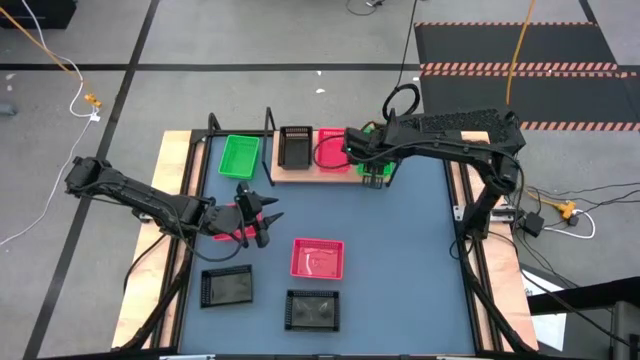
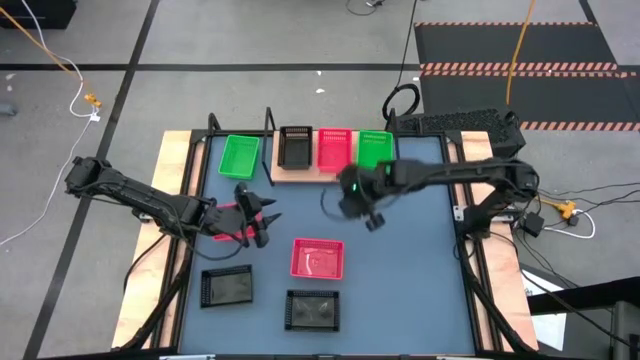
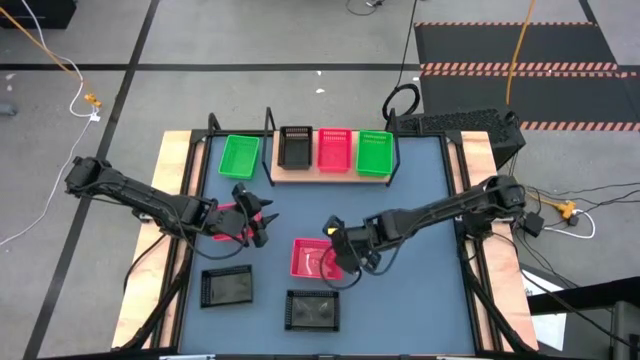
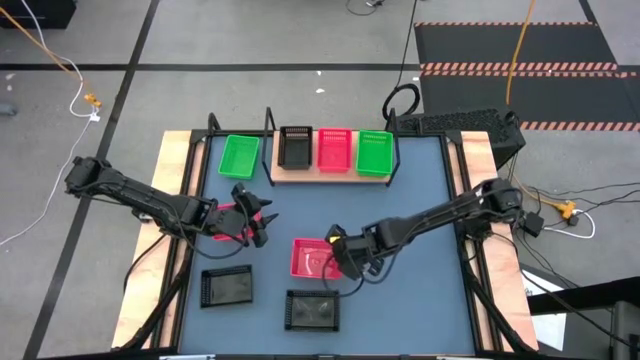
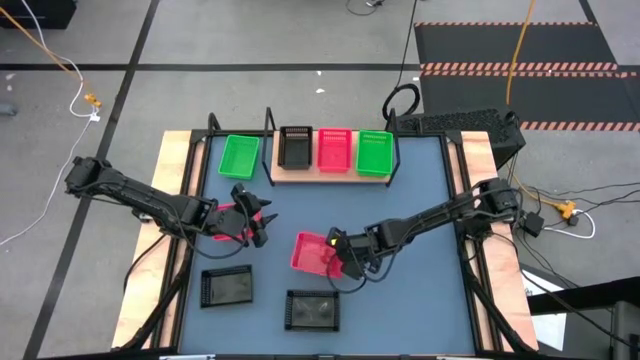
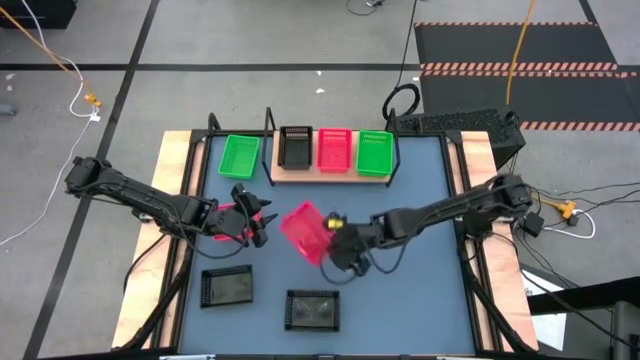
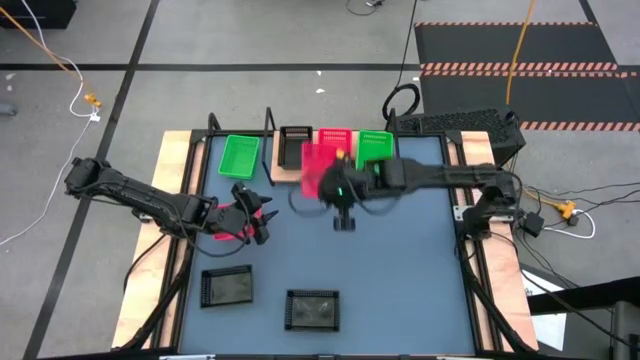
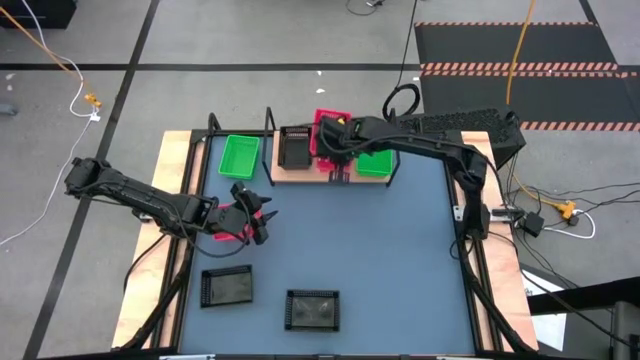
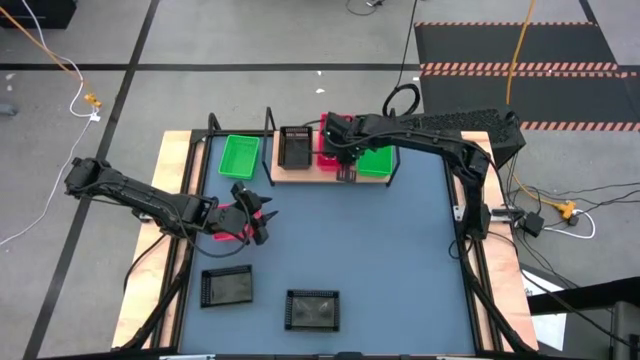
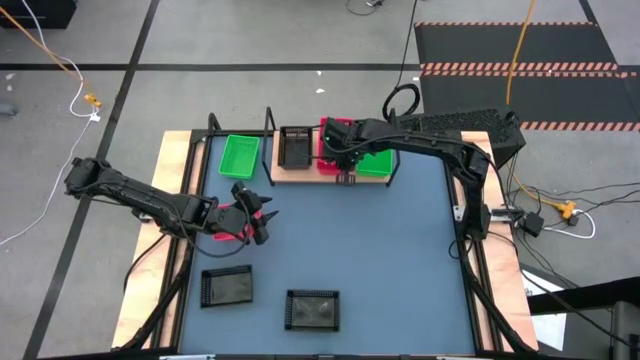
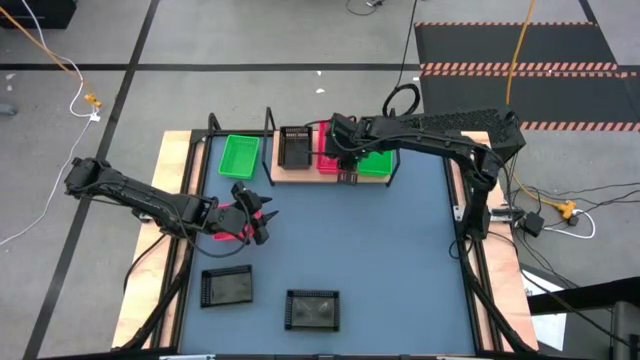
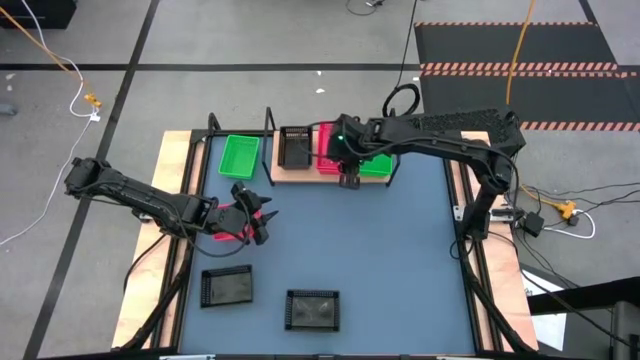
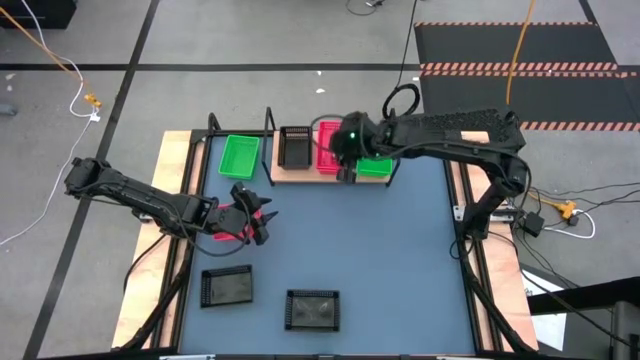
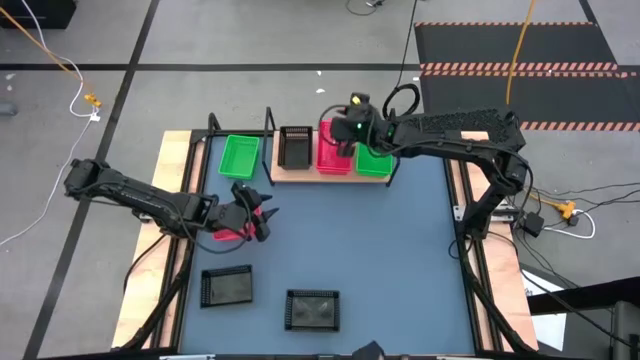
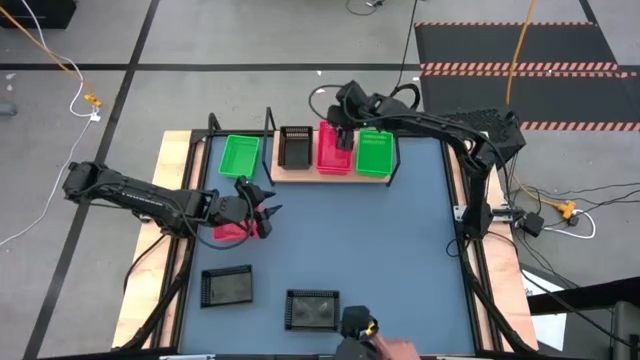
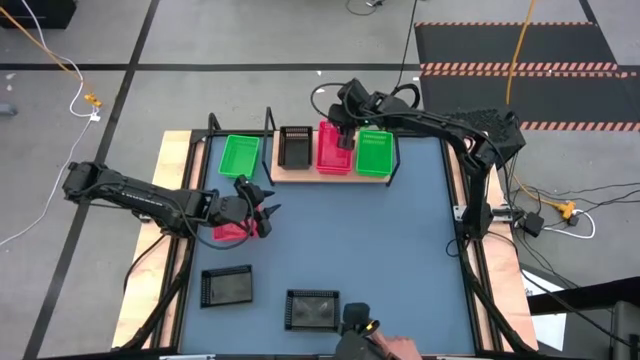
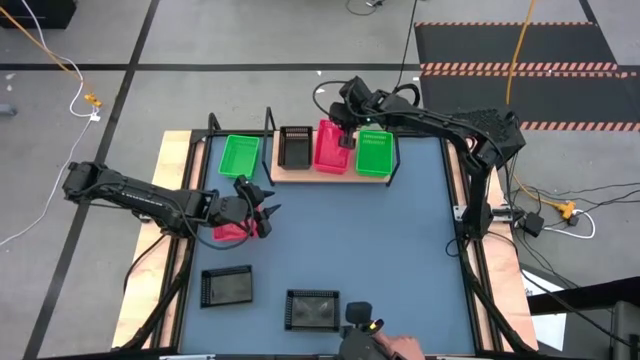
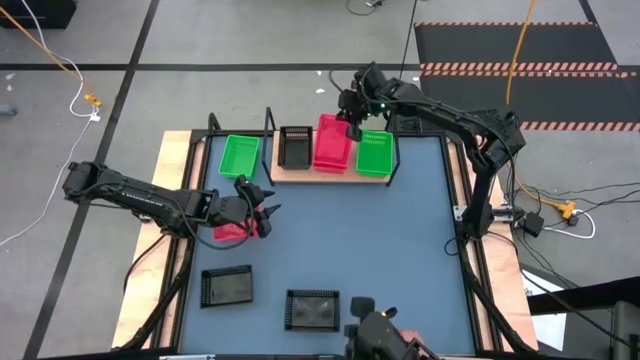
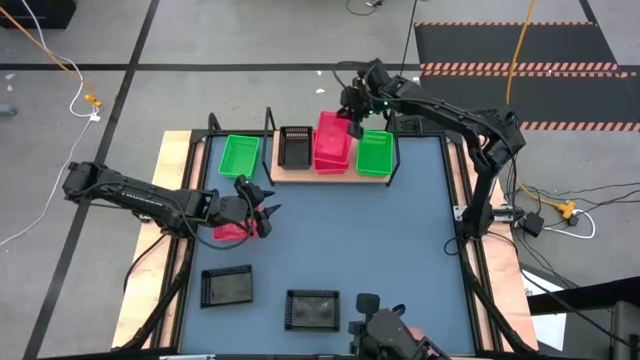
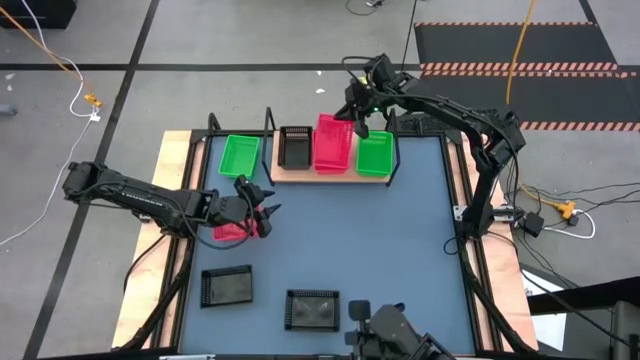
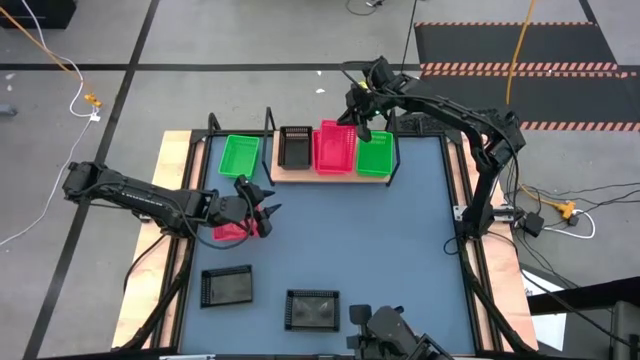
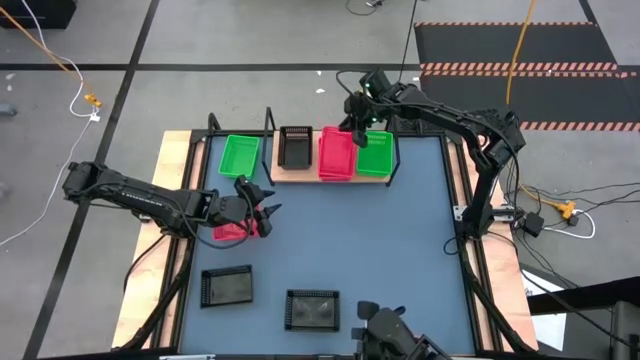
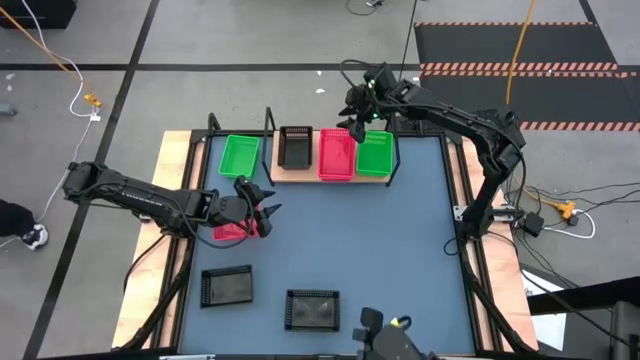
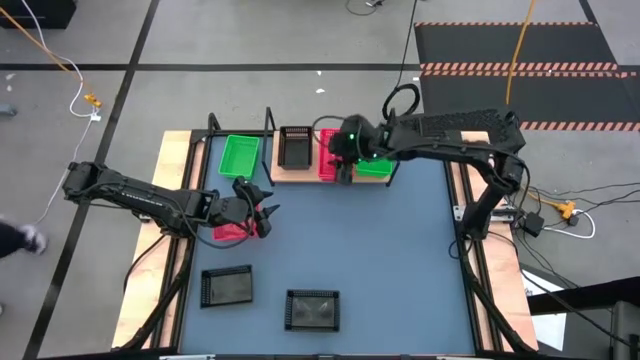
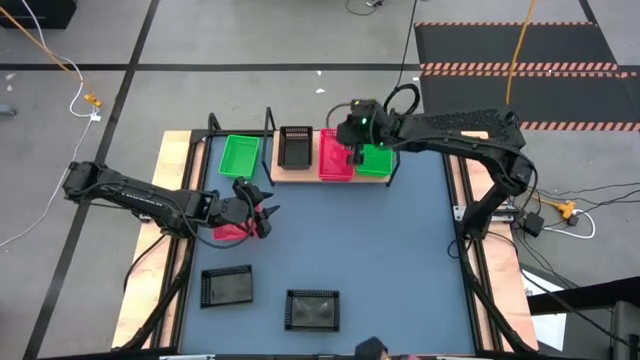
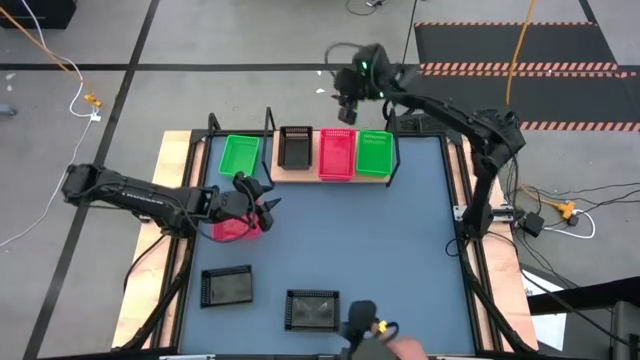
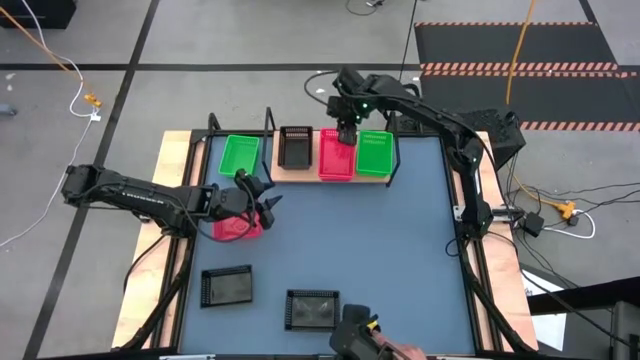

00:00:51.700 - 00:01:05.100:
Task: Stack baskets on shelf by color
Stack the right red bin on top of the red bin on the shelf

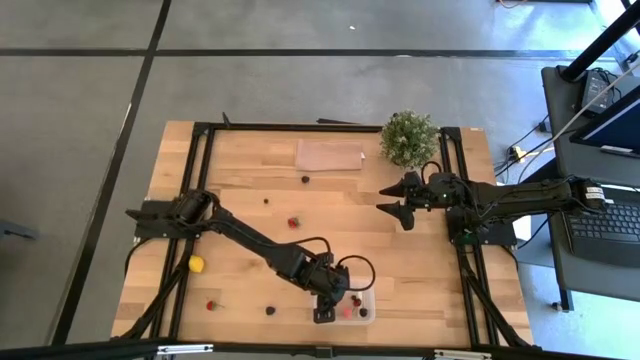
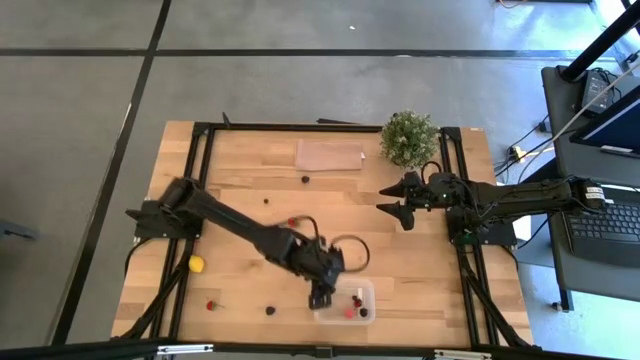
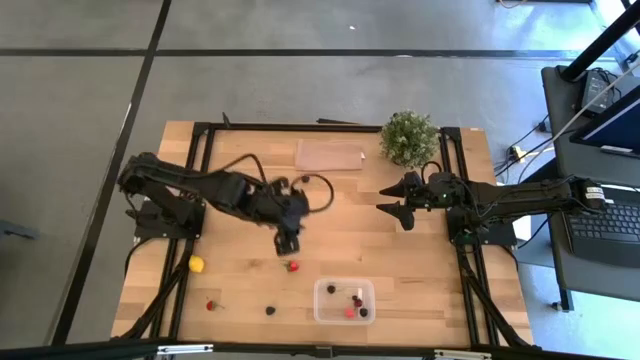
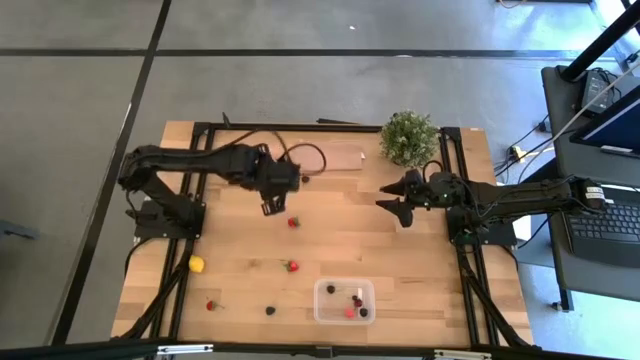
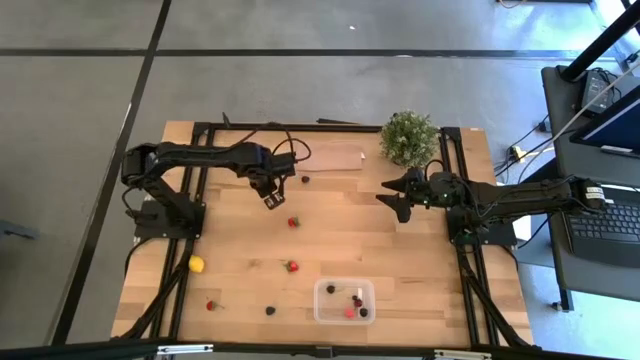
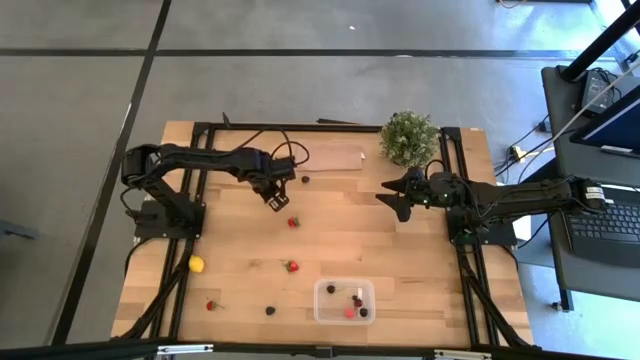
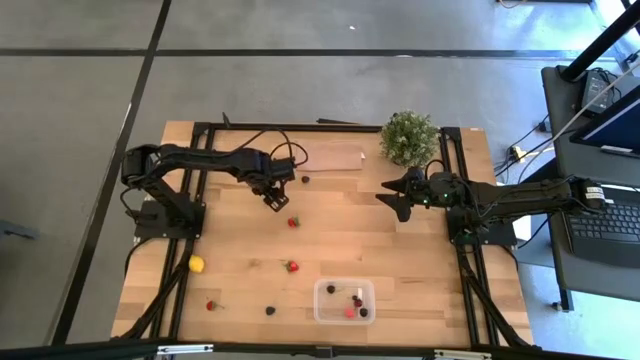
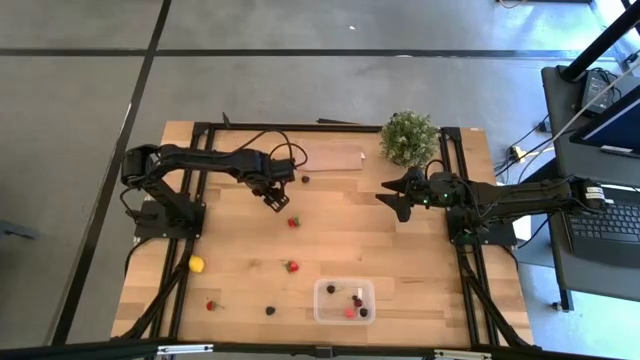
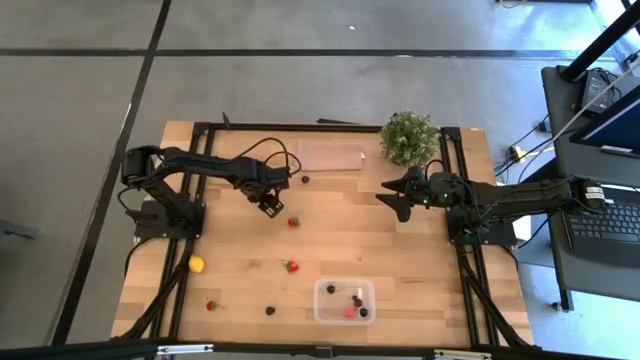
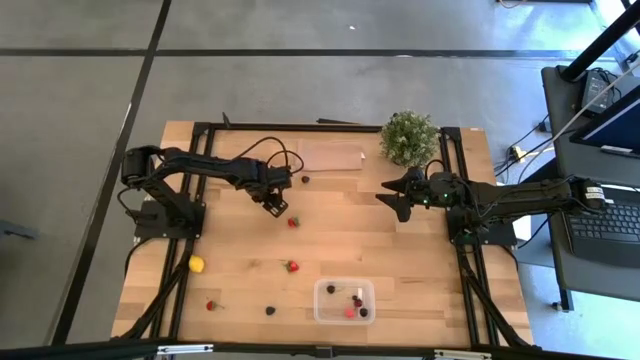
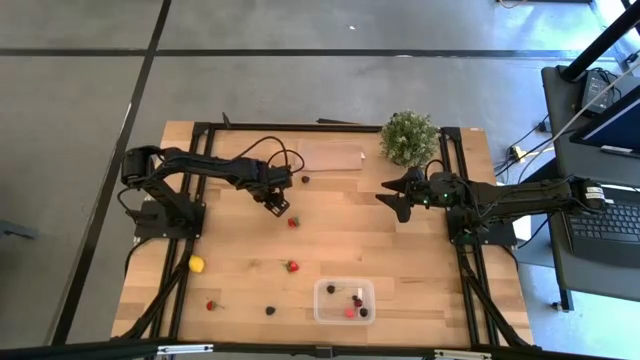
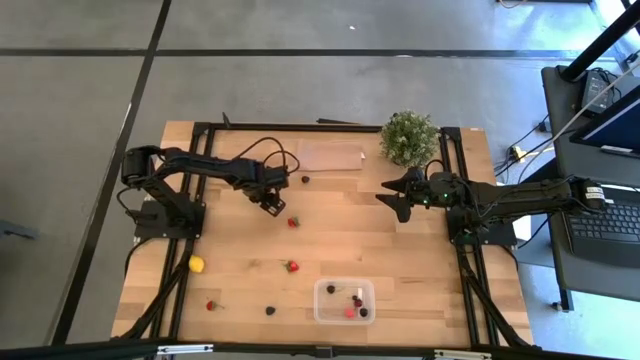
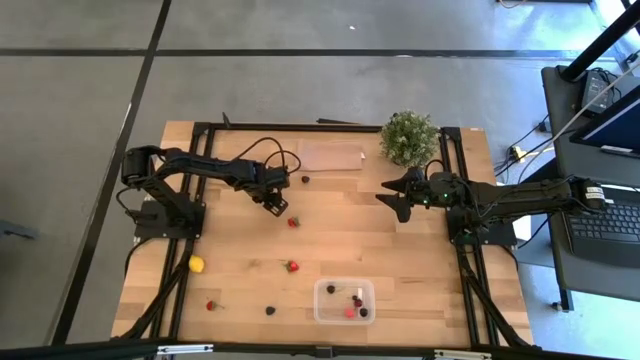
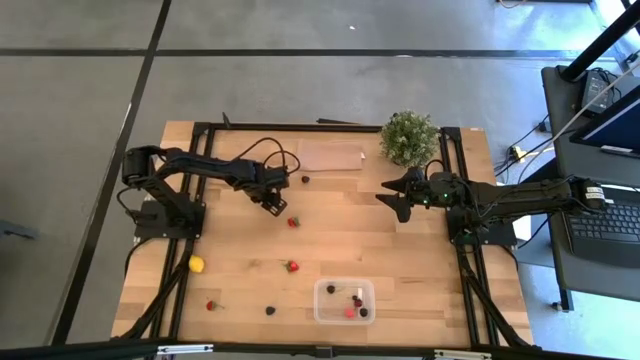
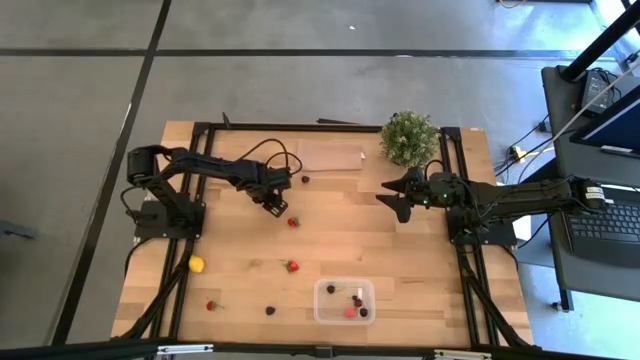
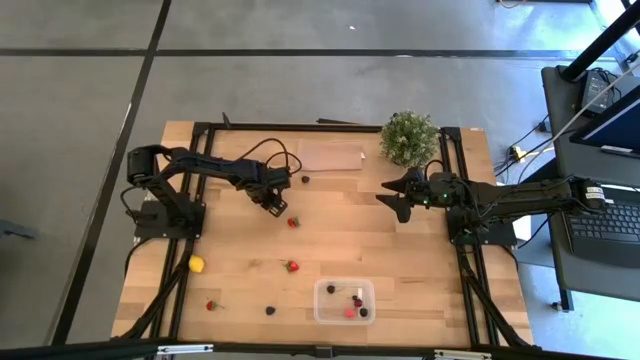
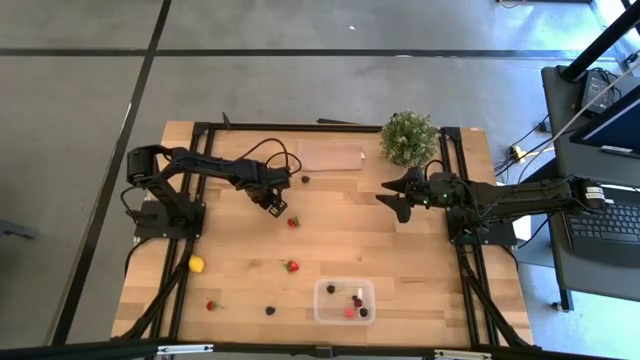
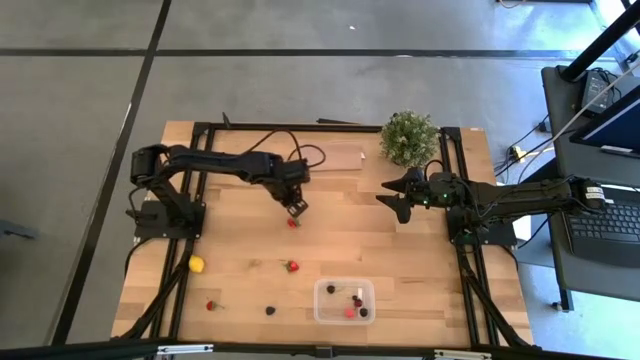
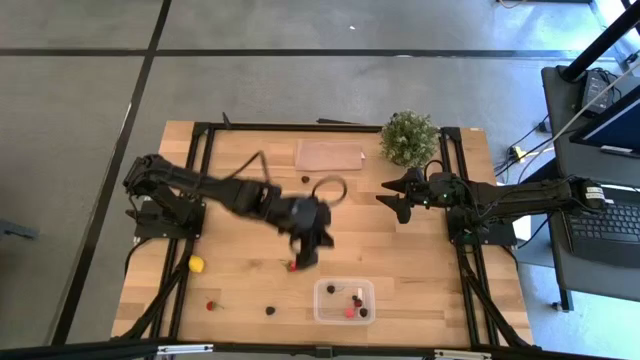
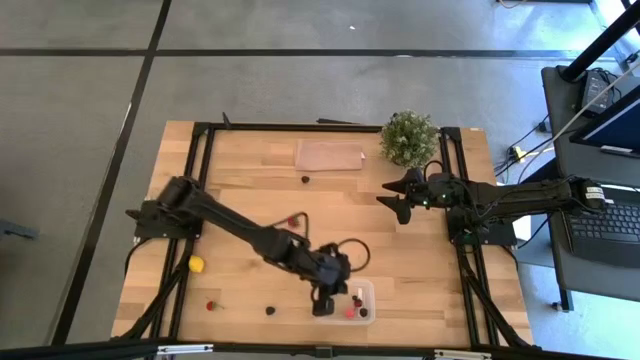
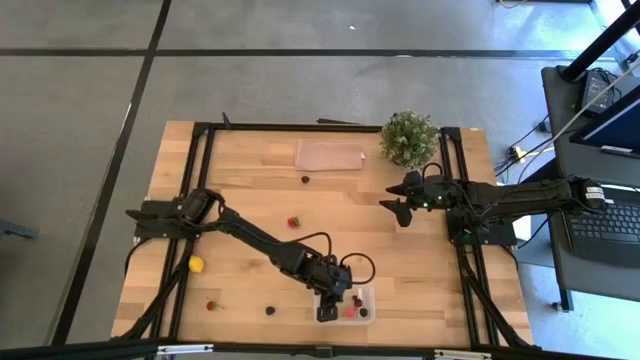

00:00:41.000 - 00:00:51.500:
Task: Pick and placing Produce into tupperware
Put the blueberry into the transparent container
